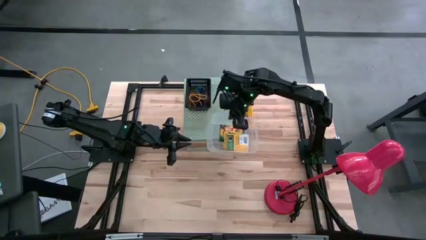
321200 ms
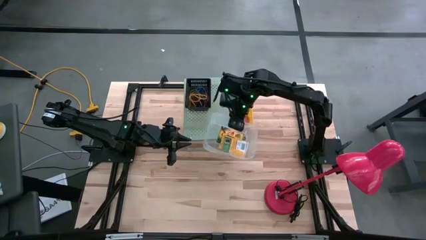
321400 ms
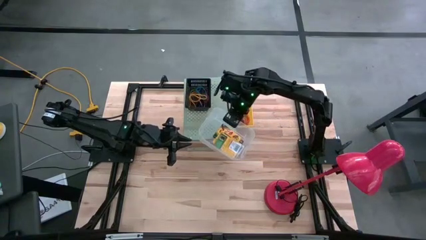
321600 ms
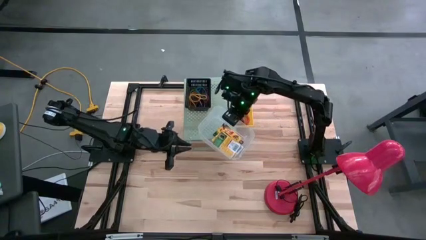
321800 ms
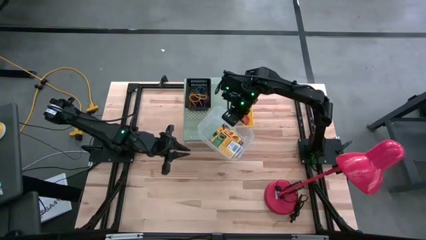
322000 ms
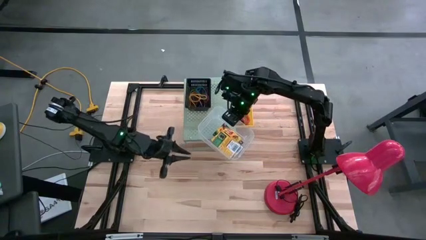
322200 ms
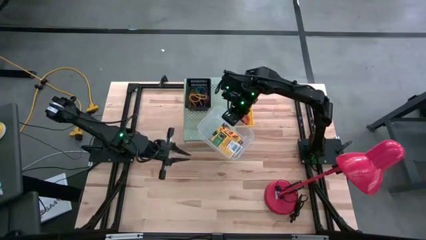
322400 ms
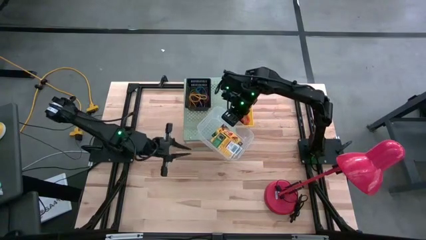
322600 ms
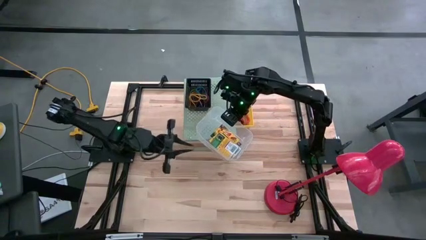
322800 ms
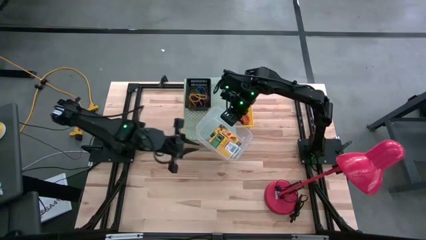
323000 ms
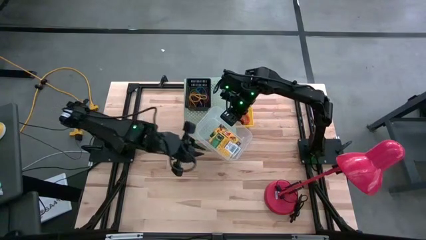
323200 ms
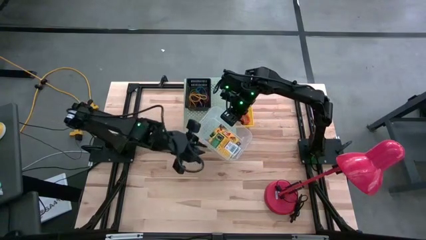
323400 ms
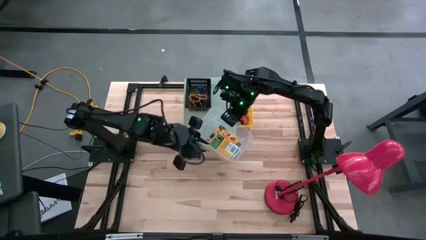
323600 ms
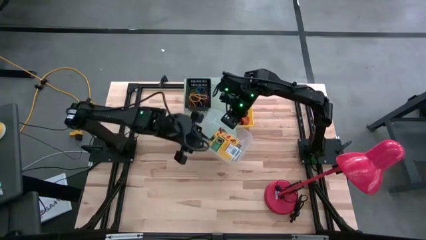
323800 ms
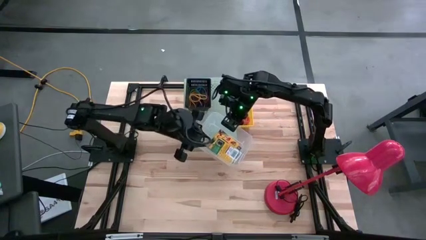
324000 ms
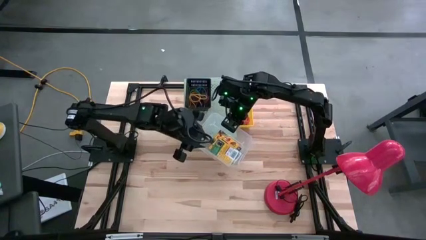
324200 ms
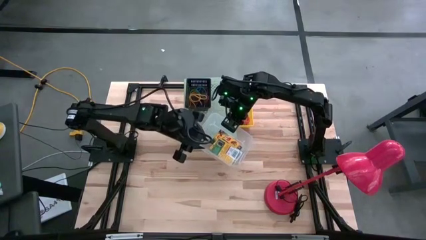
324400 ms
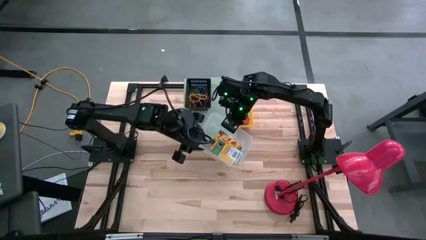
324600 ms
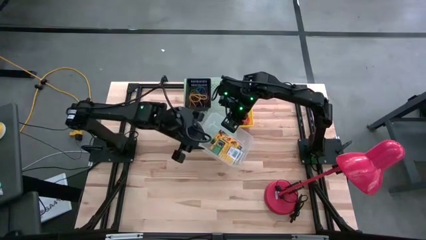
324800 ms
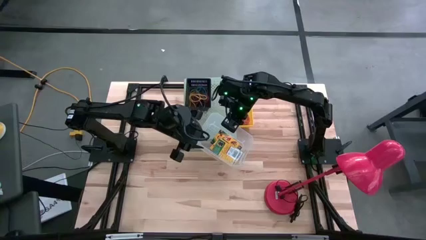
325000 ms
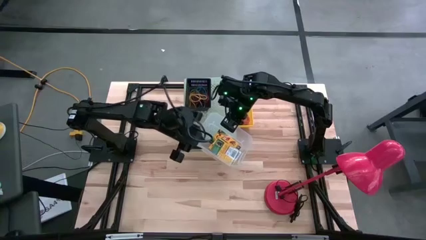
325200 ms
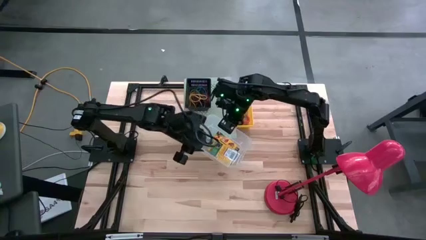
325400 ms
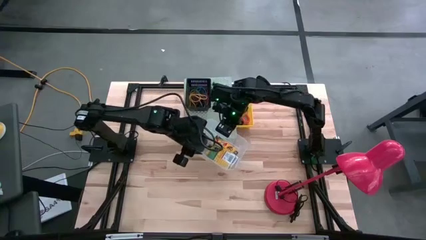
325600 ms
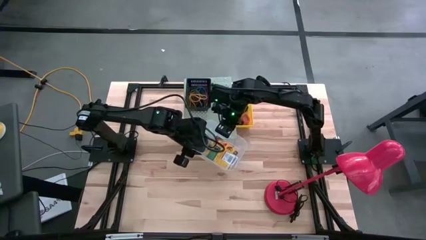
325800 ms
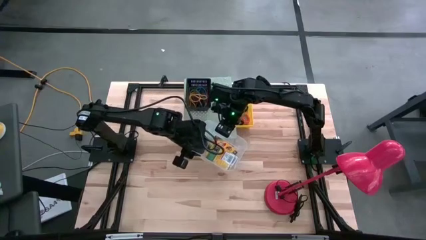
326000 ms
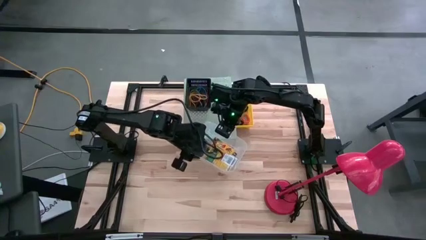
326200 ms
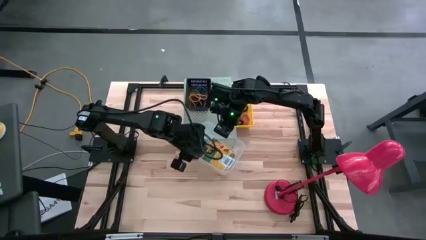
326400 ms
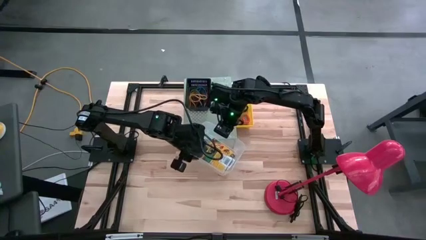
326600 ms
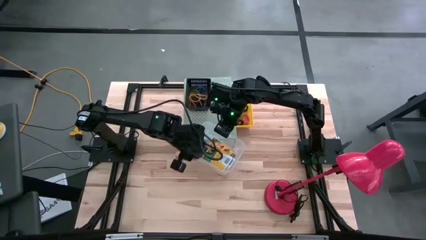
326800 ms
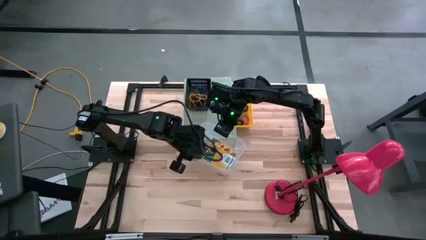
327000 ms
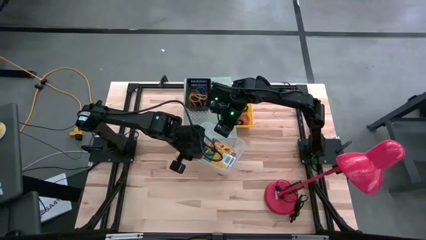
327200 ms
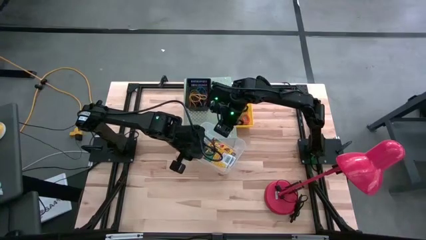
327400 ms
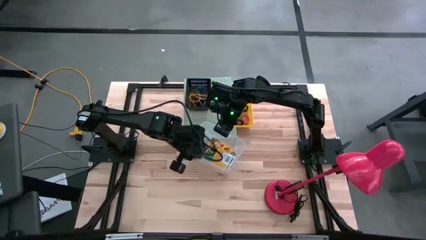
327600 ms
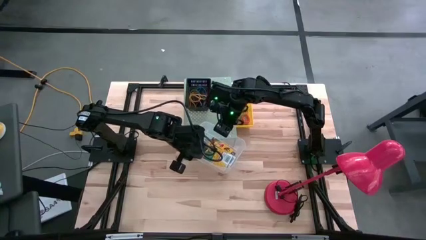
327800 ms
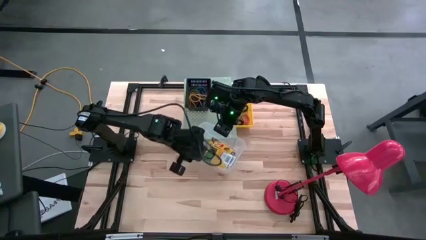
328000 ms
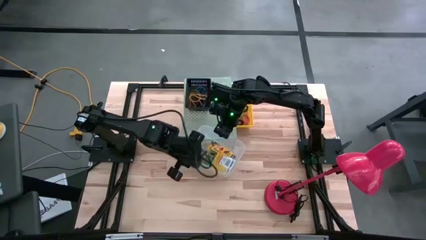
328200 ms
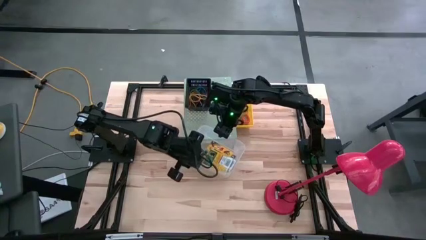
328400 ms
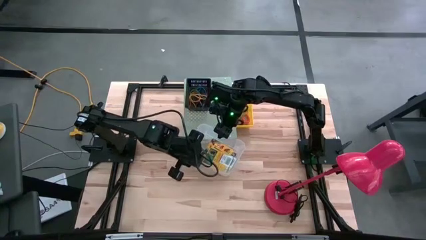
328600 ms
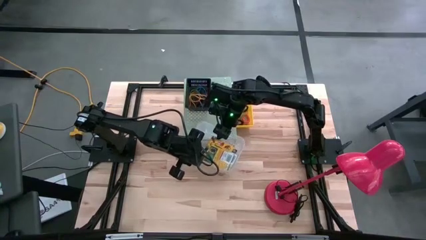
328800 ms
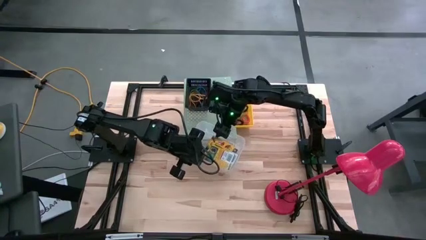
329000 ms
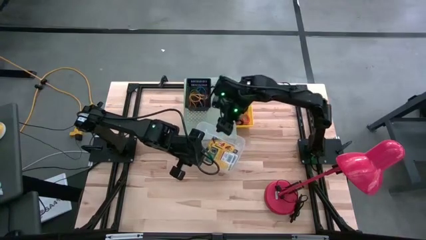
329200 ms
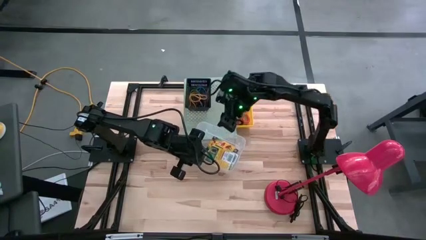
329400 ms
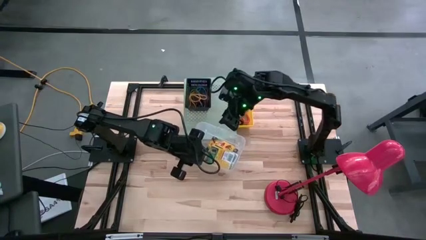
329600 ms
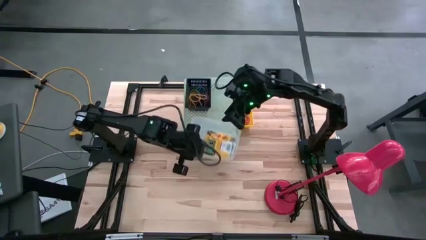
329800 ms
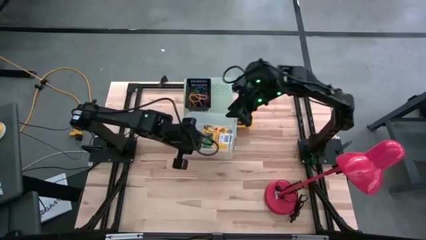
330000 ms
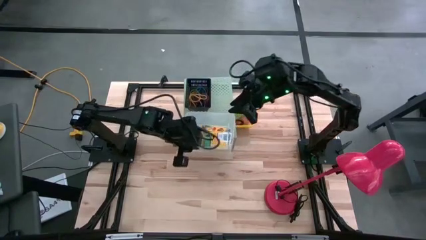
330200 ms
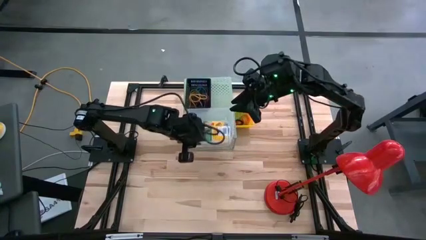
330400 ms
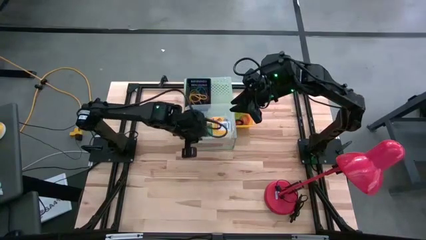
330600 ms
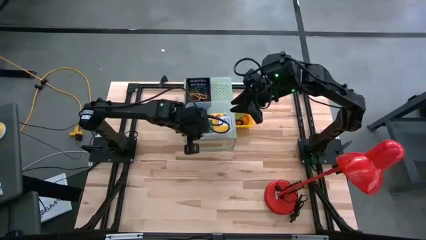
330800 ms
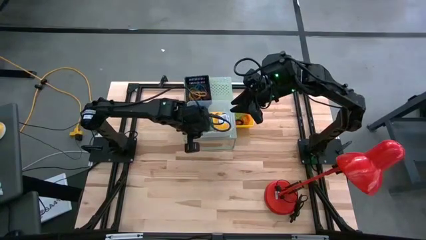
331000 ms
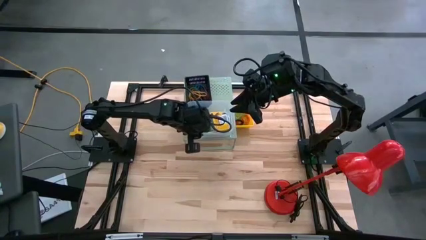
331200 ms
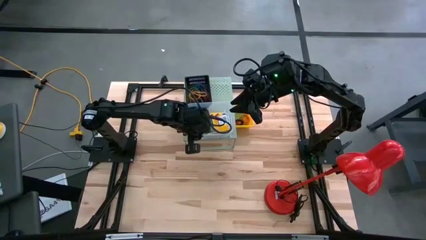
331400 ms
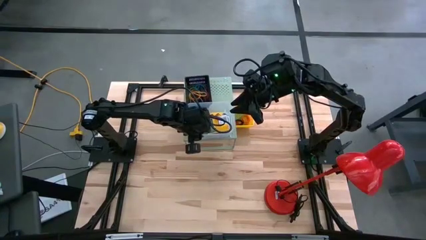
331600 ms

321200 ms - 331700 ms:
Task: Pick & Place Office Desk Supplies
Put the transparent bin with sorted crayon boxes on the shelf
